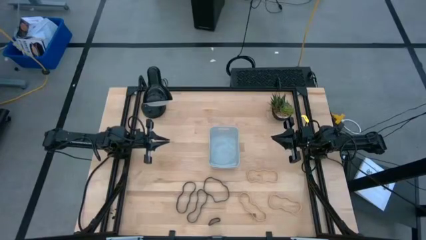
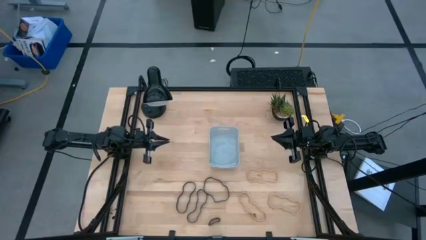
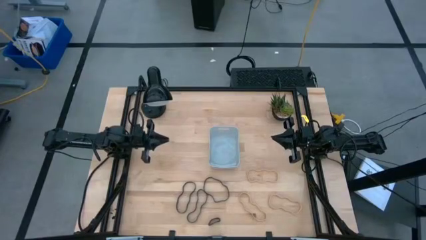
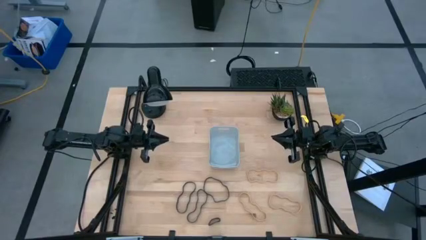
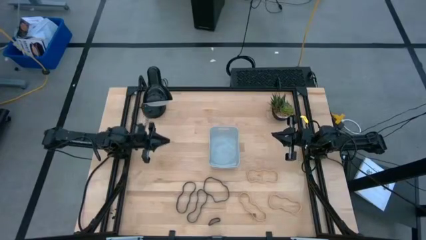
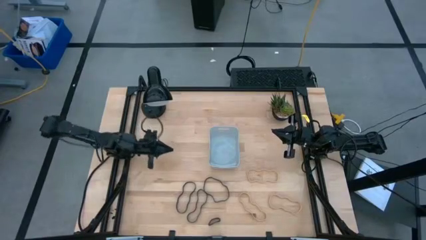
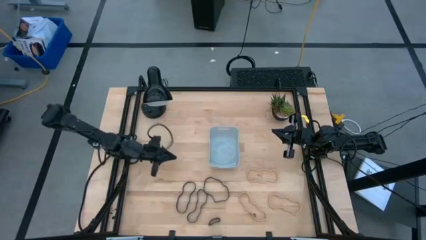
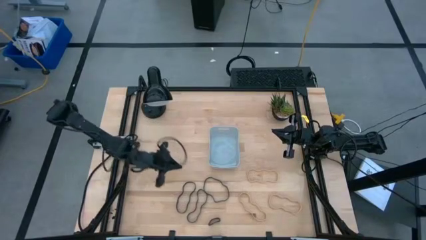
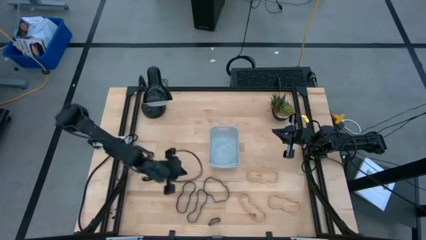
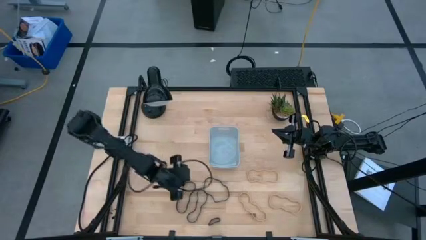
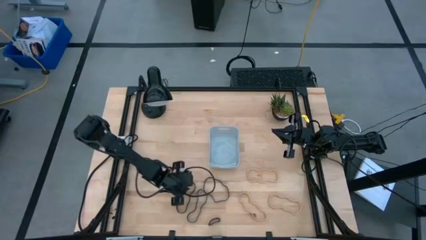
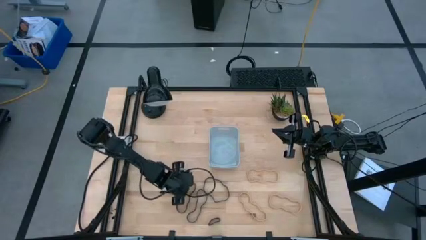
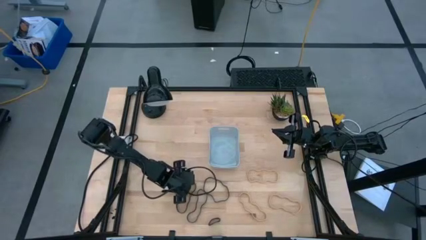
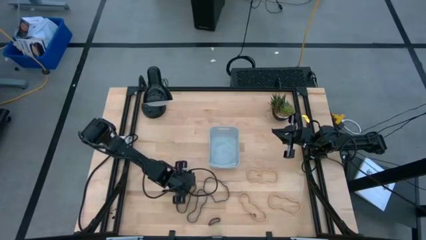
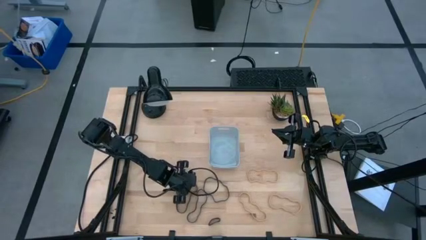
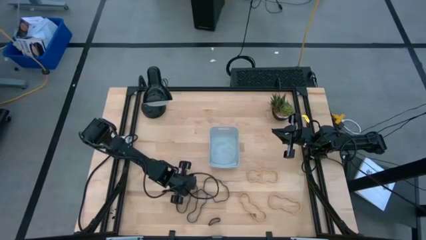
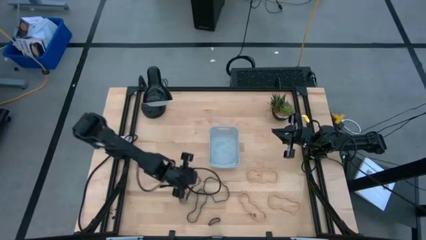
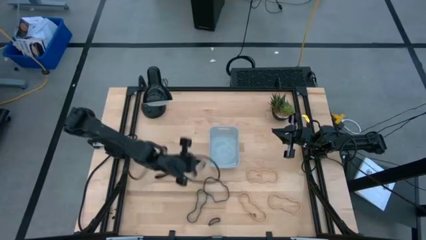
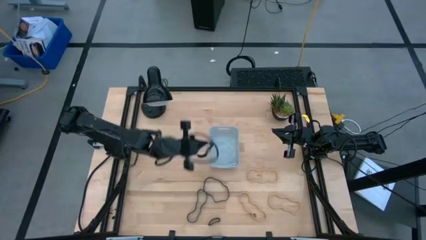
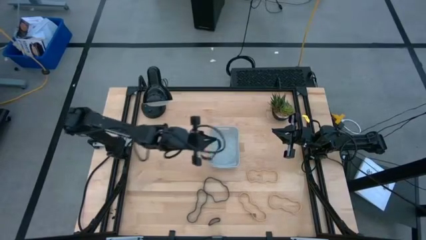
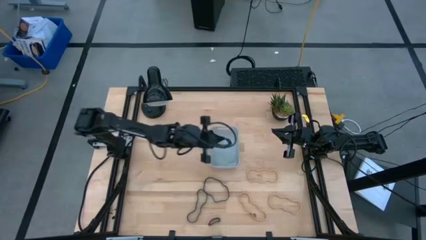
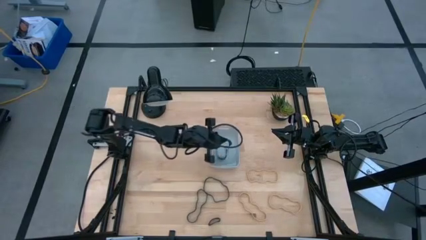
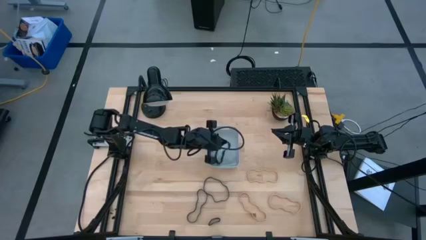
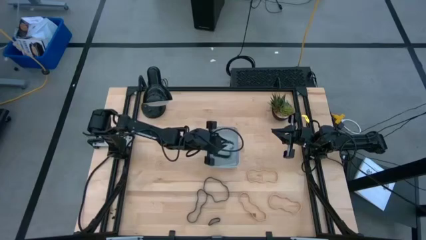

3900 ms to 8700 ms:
Task: Pick and place rubber bands into bin
Put the black rubber band into the gray container

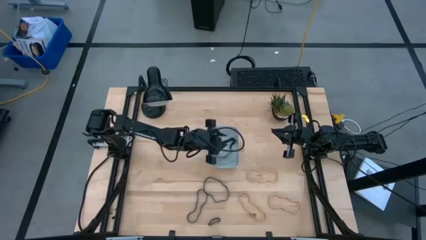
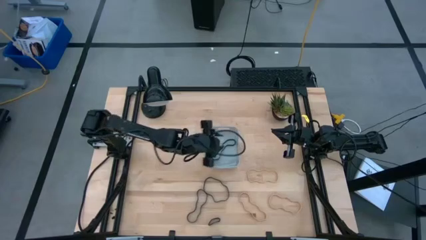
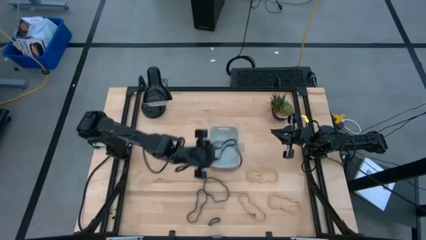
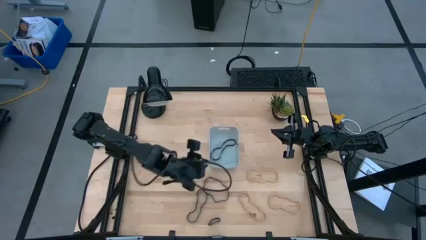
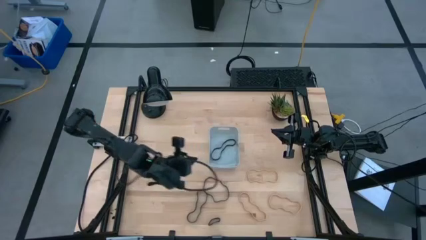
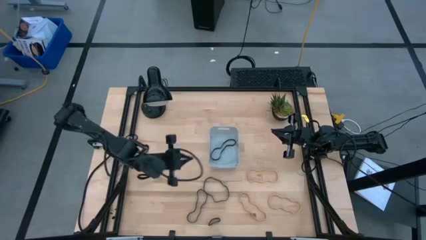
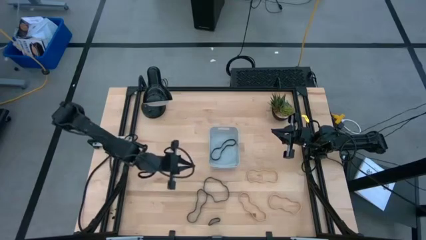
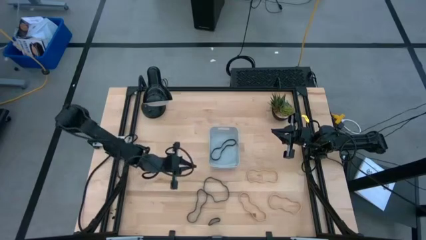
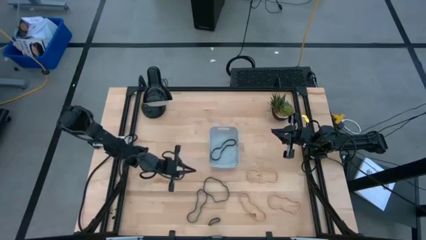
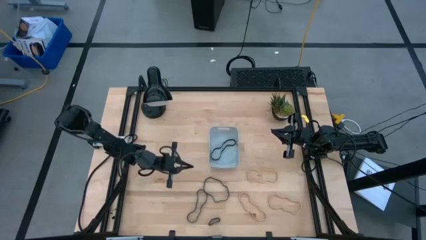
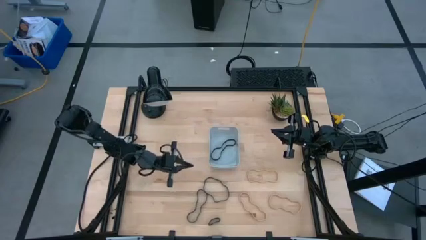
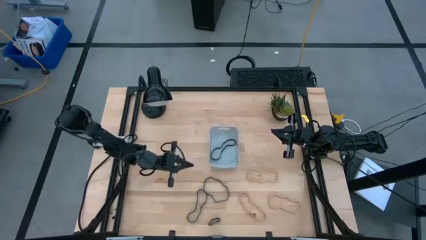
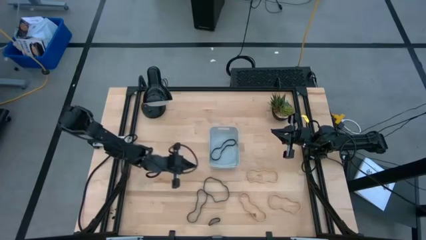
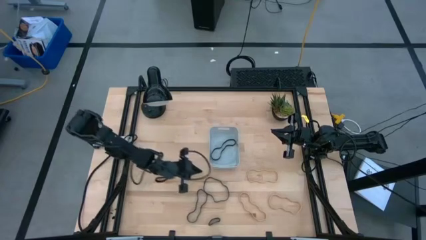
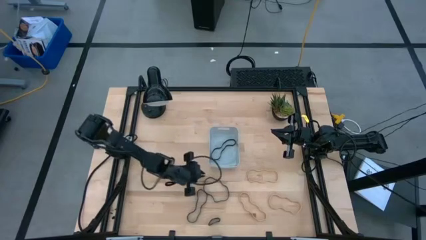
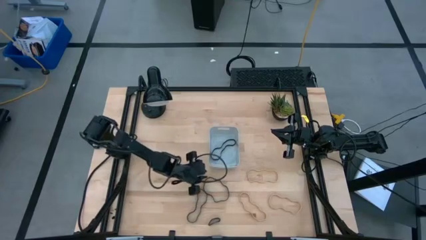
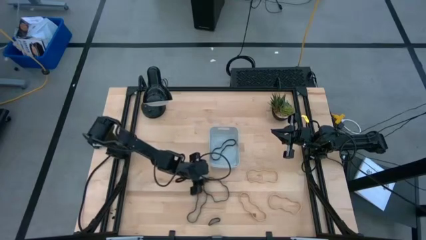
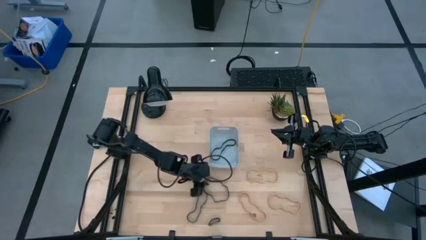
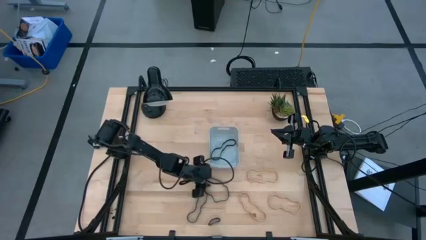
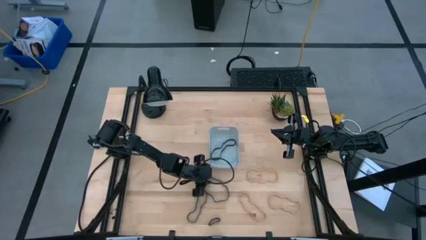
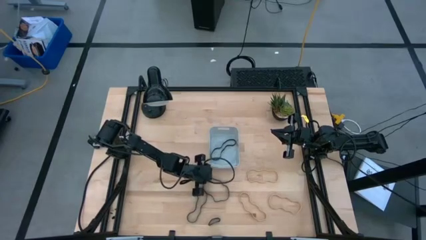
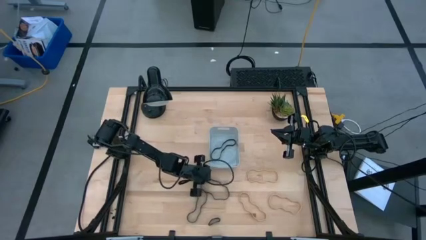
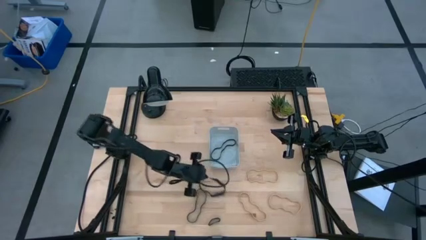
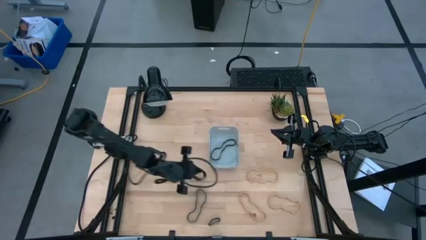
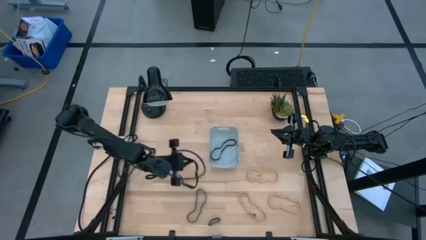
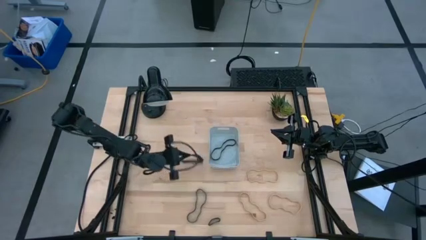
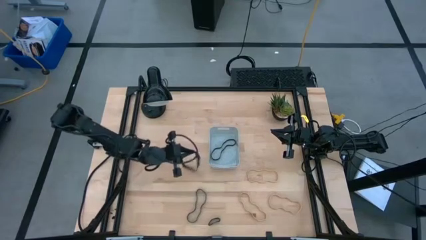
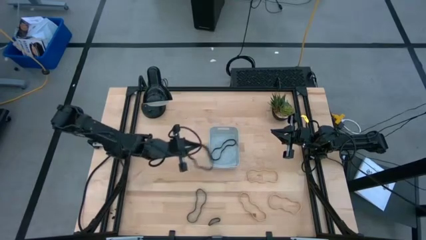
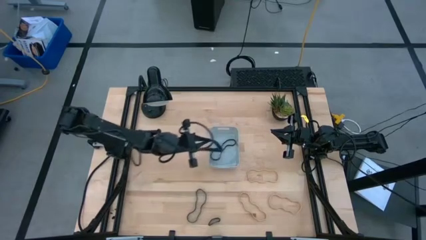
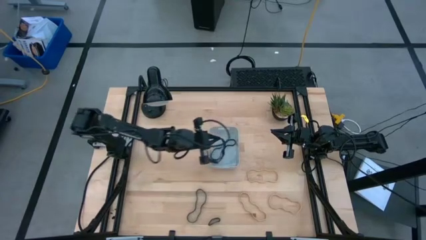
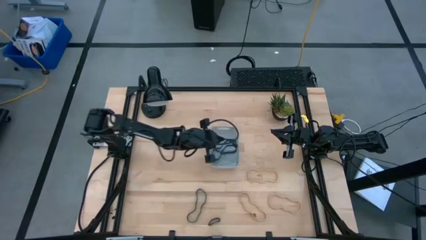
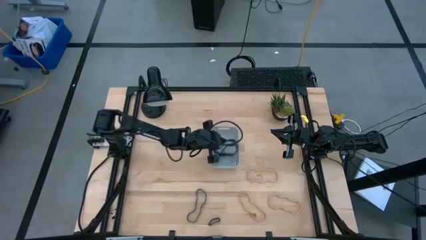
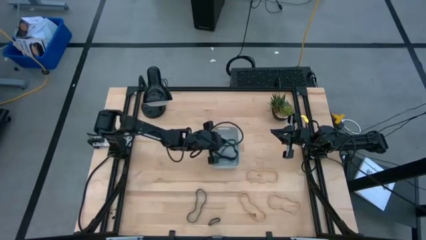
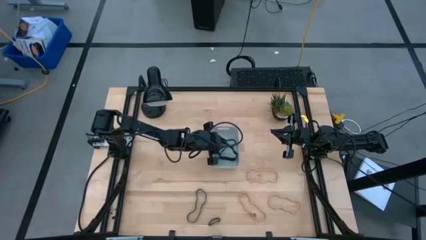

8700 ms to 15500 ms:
Put the black rubber band into the gray container

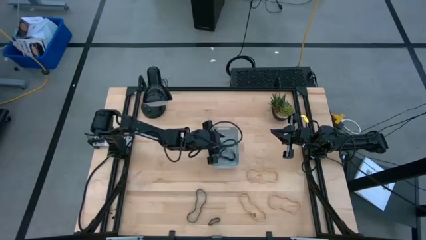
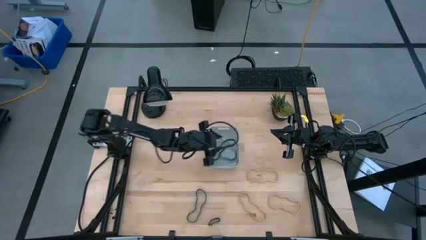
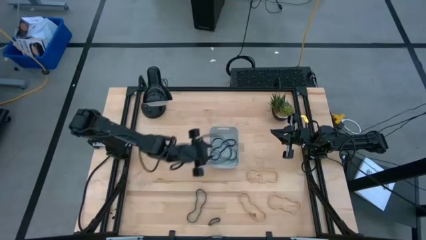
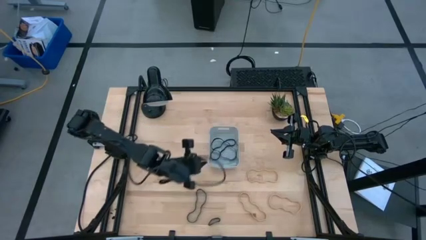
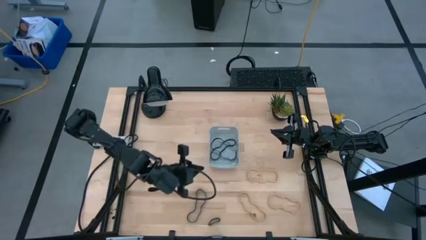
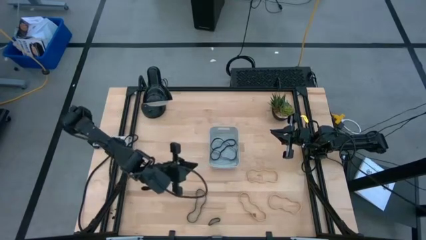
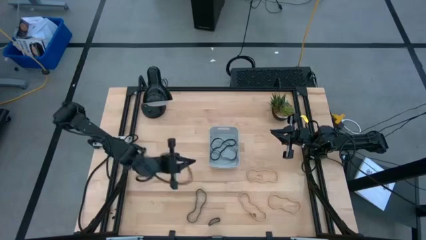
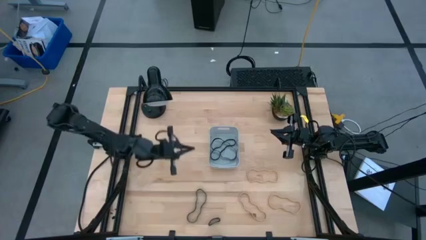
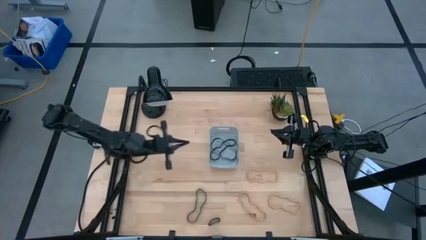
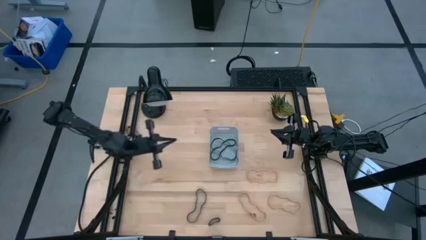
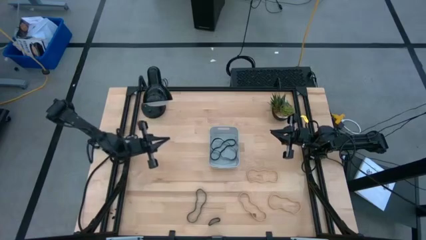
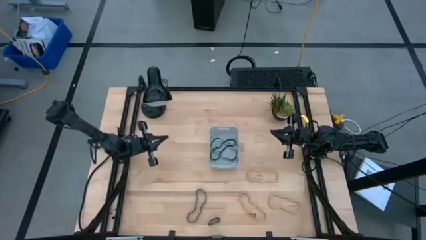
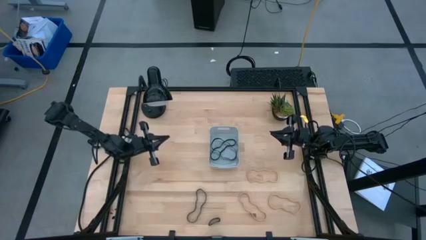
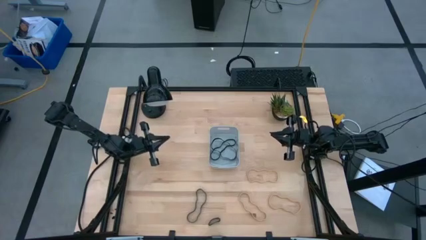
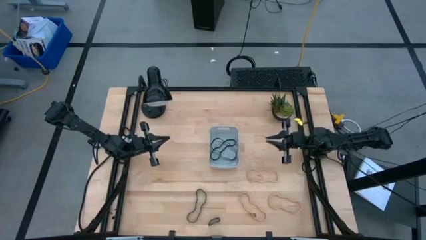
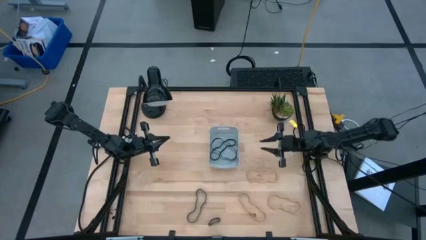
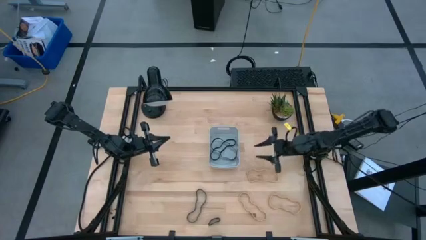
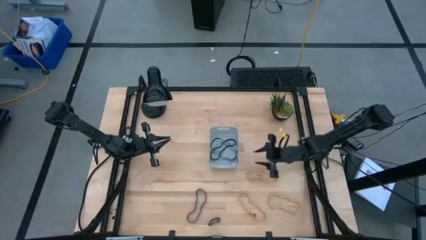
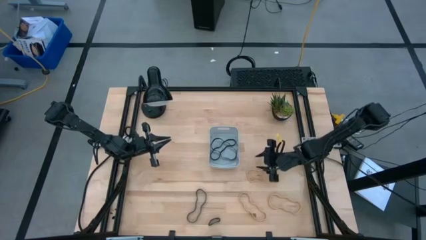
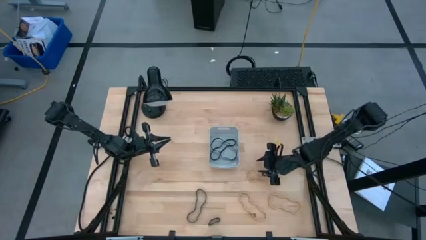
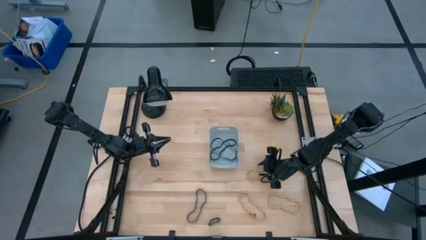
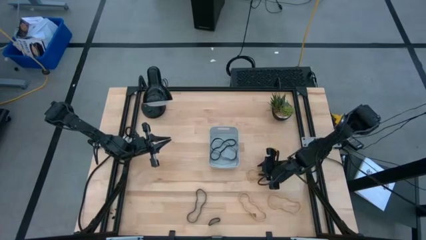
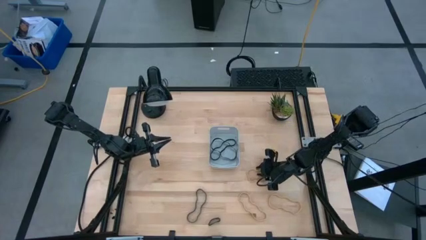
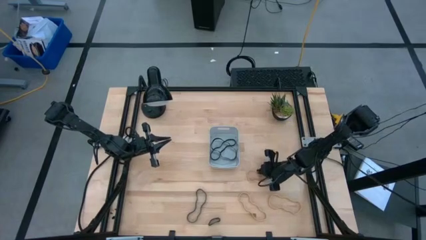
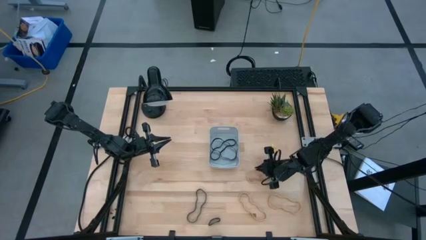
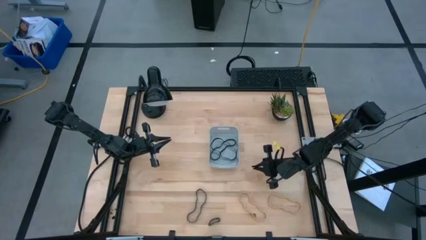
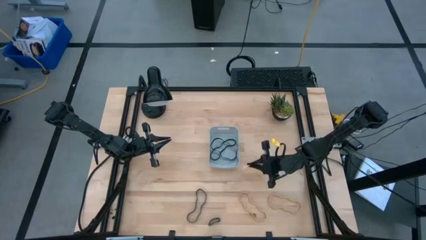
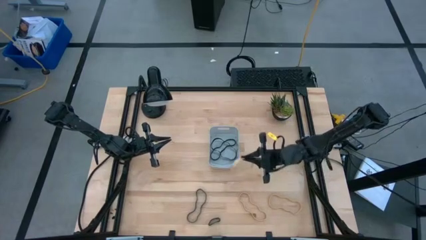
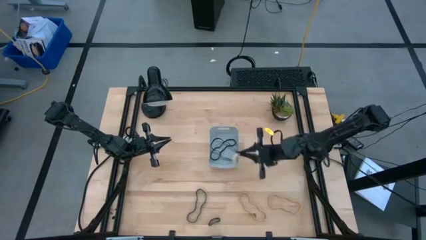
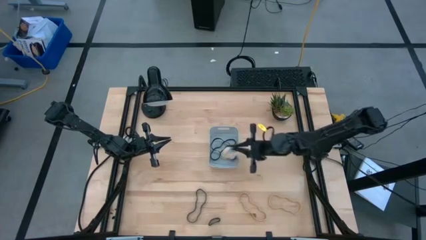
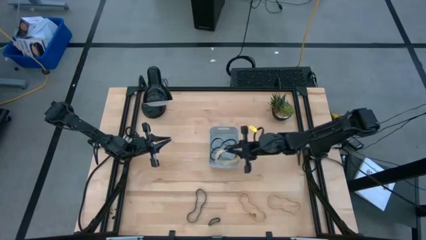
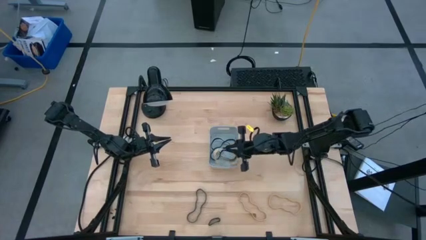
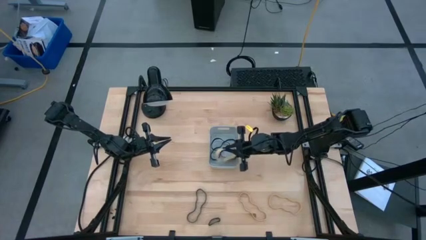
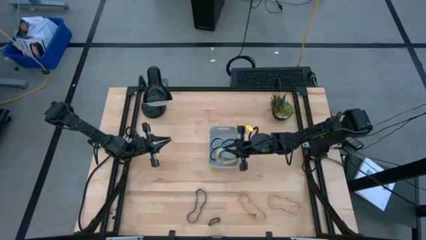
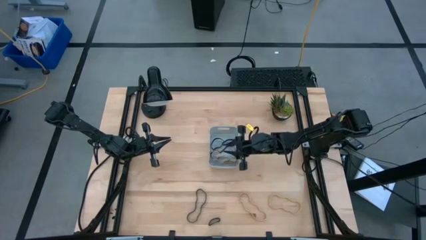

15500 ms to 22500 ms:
Put the brown rubber band into the gray container
